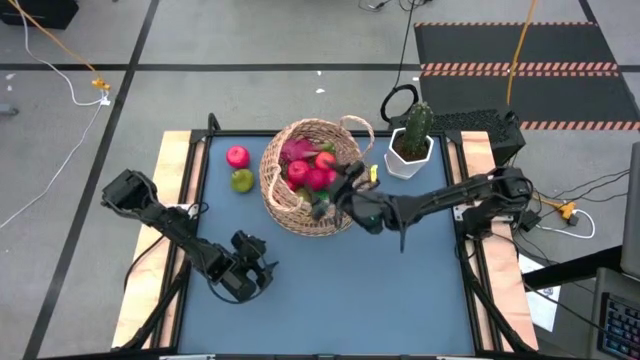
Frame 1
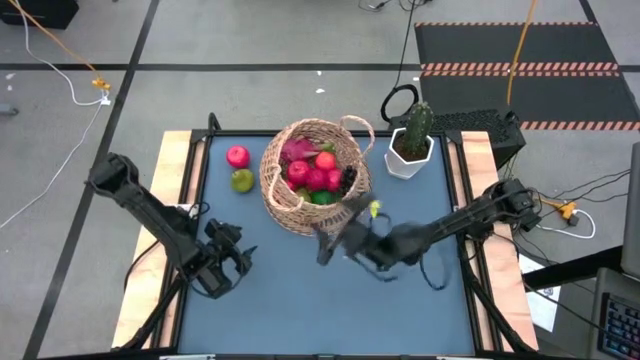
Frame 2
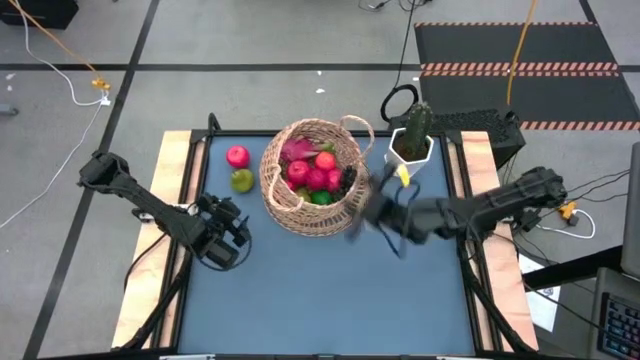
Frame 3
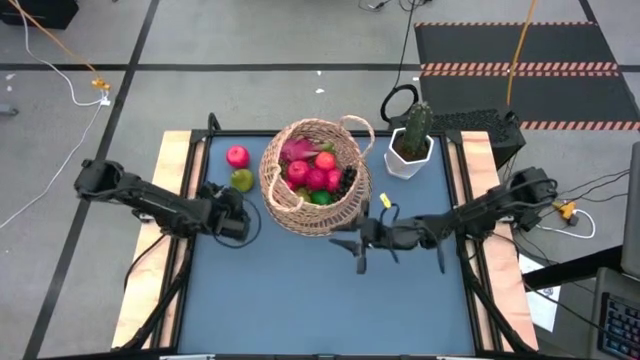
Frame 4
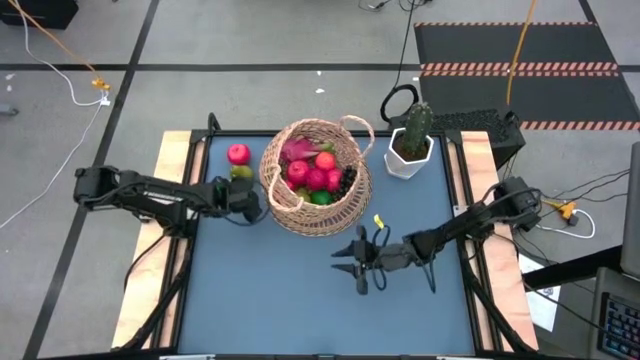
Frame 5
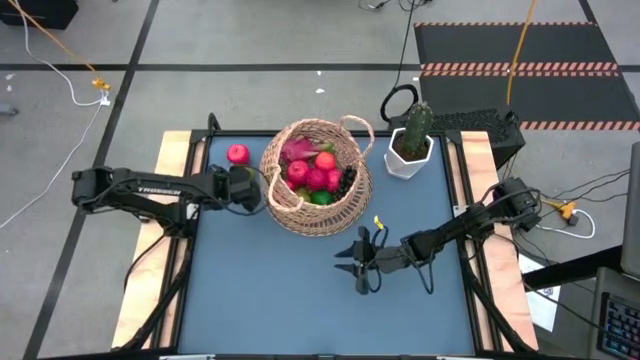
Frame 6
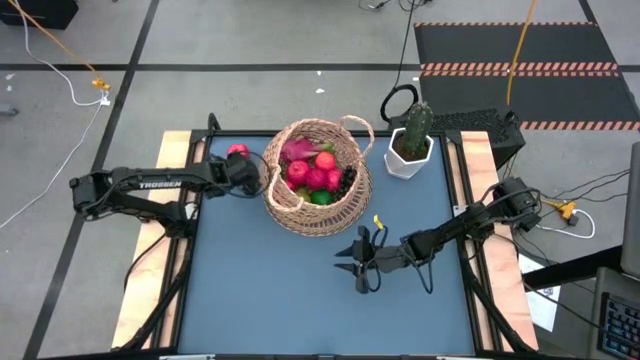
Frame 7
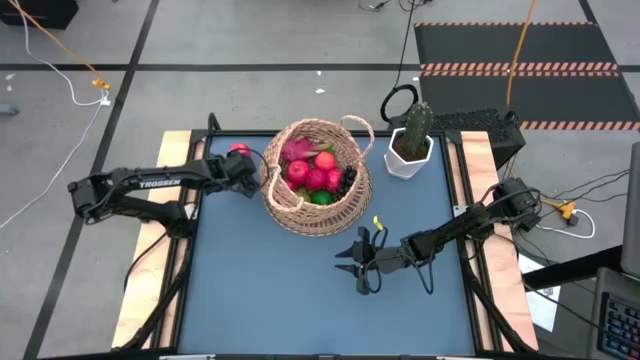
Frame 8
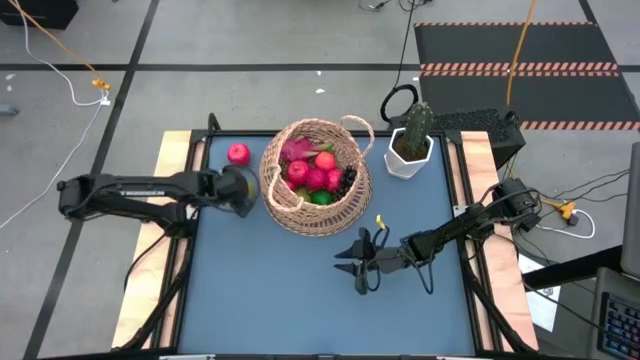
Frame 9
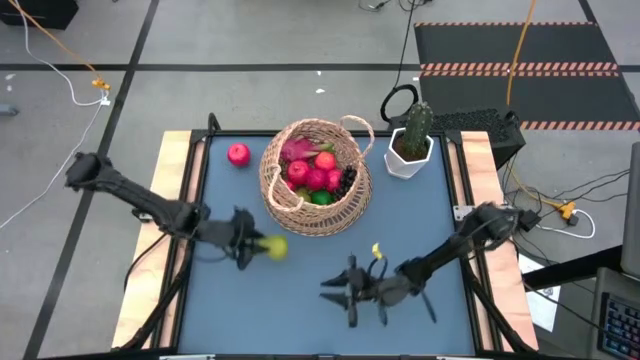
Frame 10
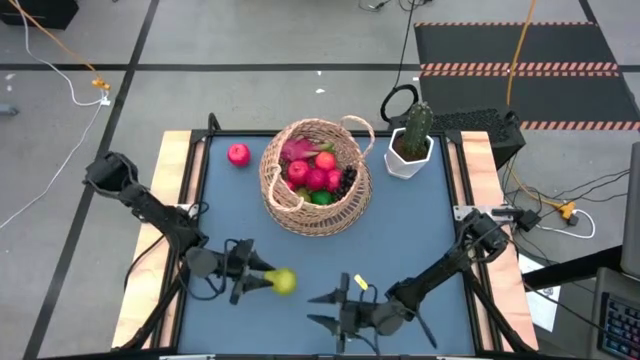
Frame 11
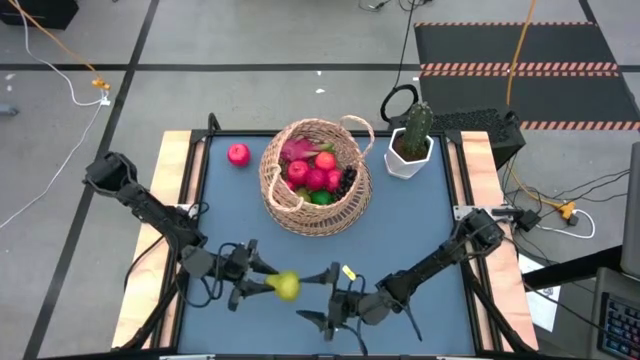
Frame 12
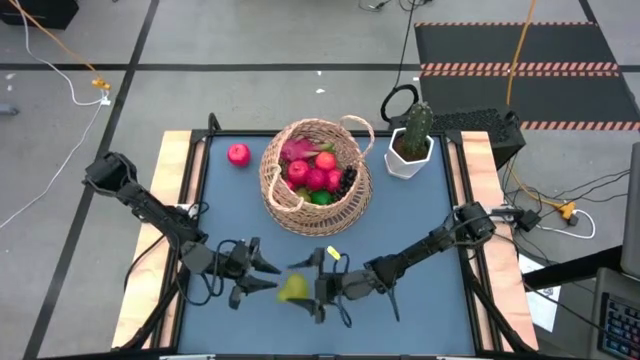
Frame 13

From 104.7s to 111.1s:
Task: Build produce basket
Put the pear into the brown basket

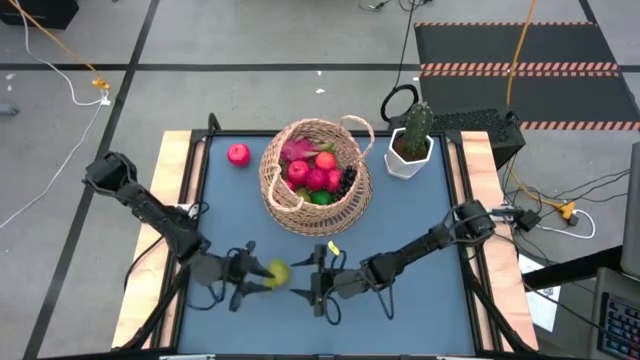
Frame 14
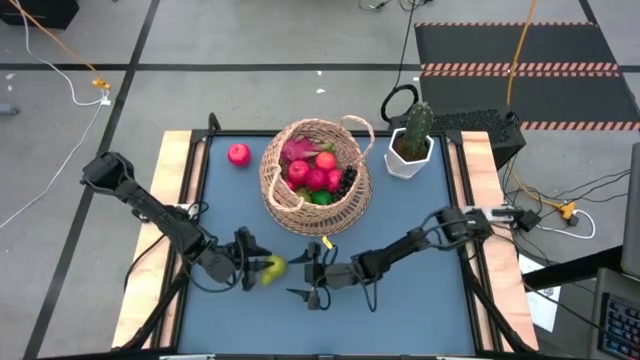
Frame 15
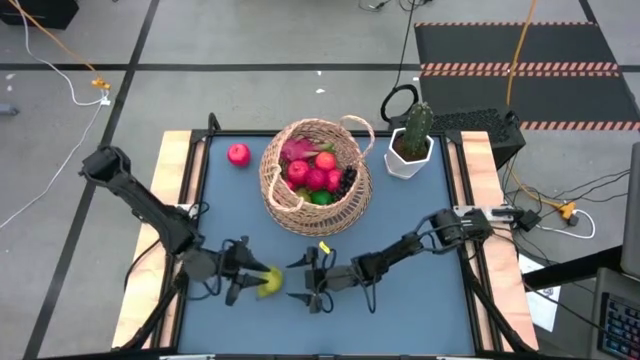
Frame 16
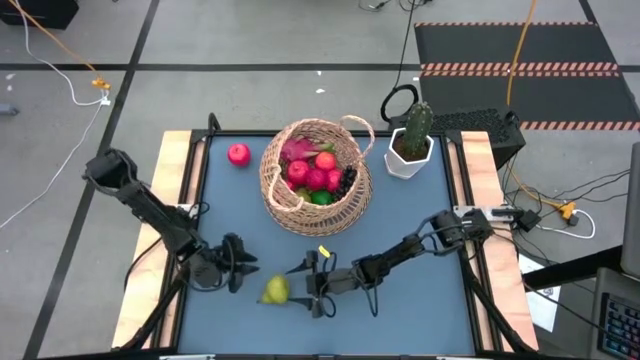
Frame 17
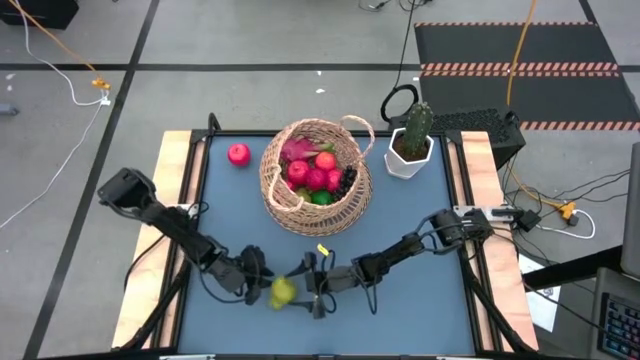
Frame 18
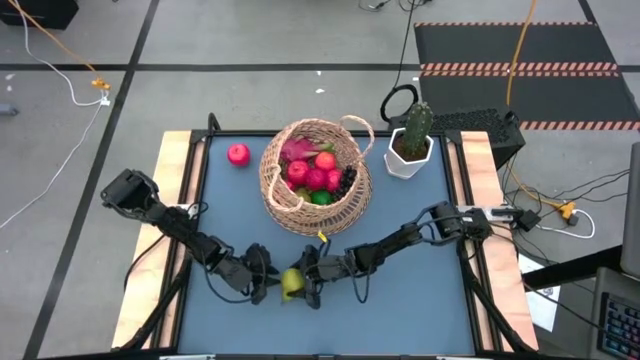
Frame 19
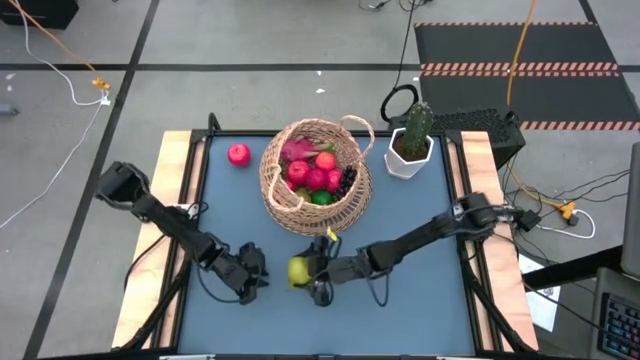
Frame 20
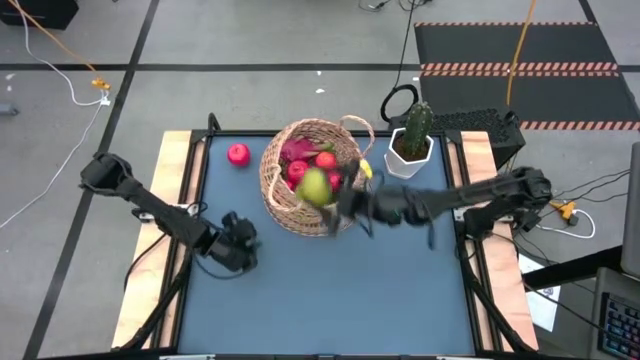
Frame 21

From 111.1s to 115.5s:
Put the pear into the brown basket

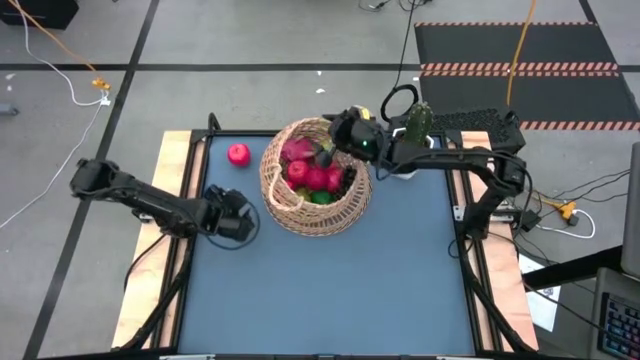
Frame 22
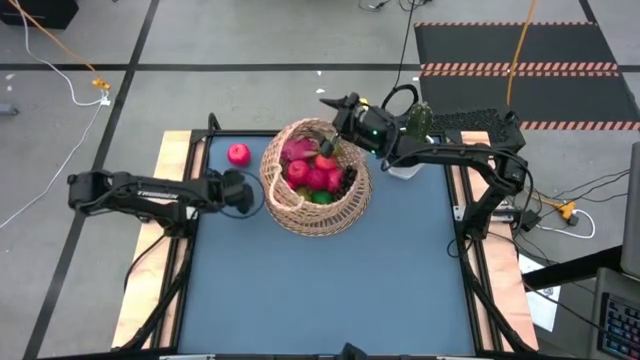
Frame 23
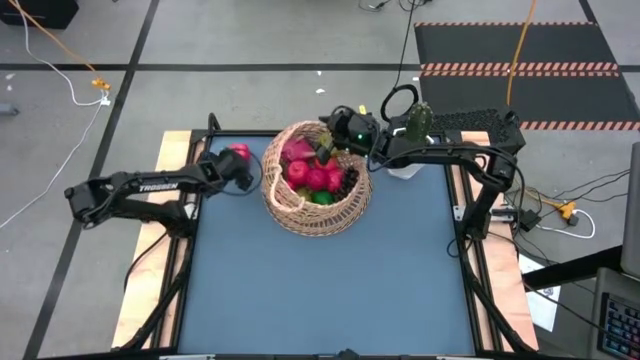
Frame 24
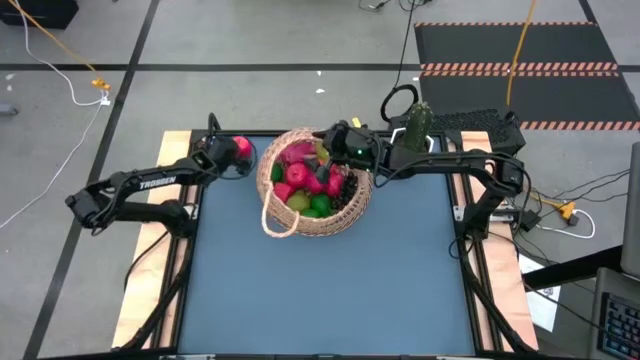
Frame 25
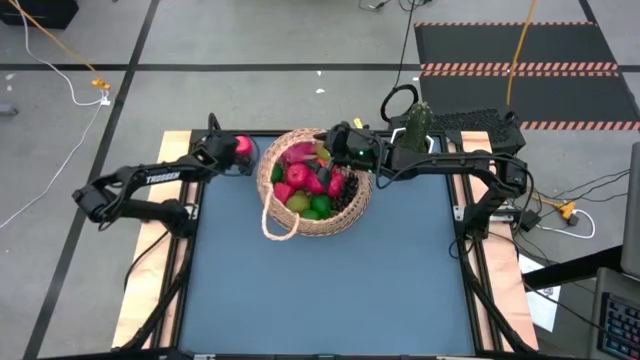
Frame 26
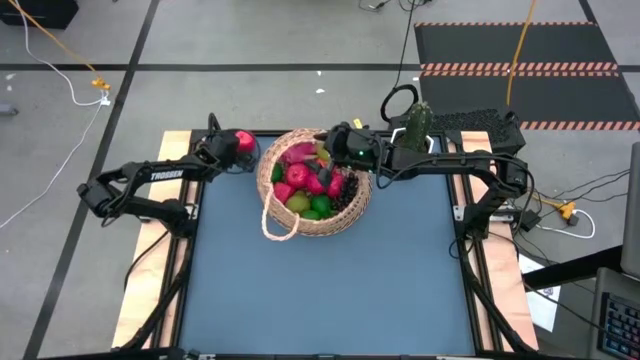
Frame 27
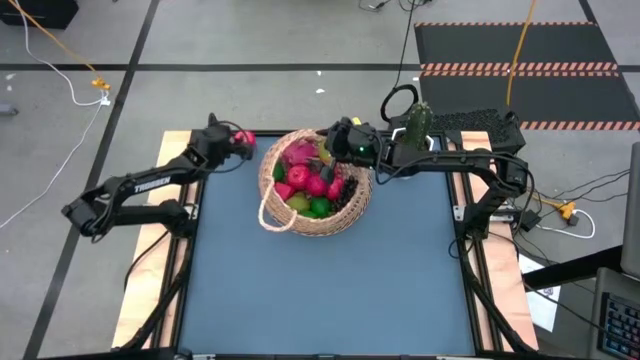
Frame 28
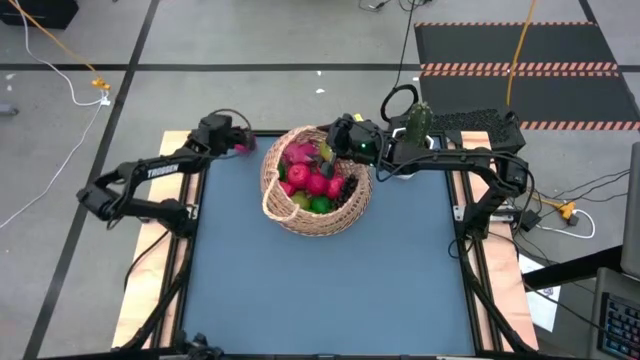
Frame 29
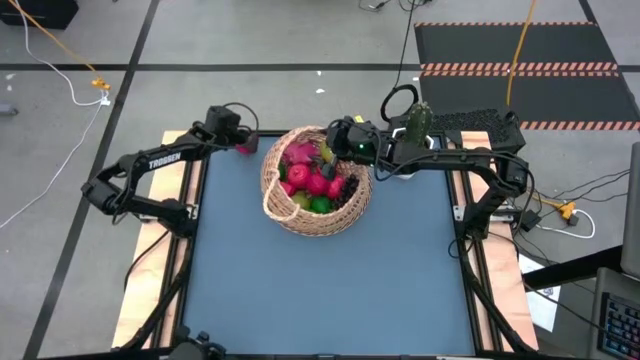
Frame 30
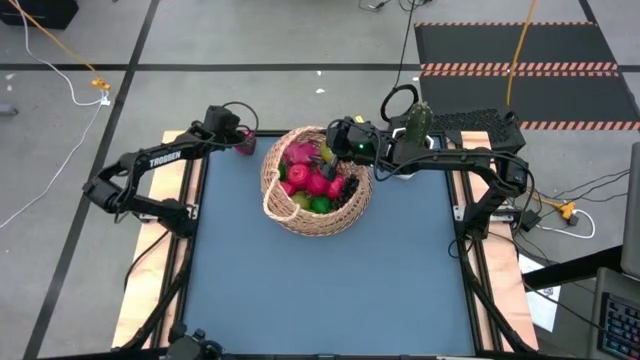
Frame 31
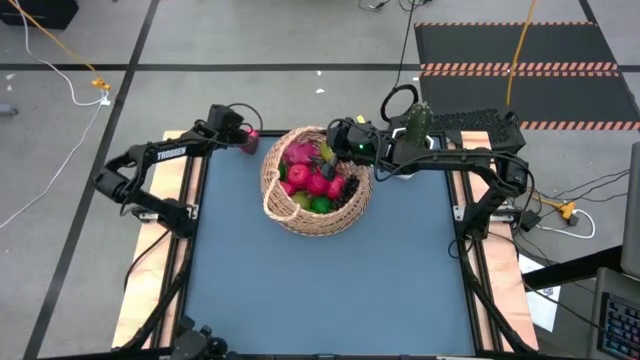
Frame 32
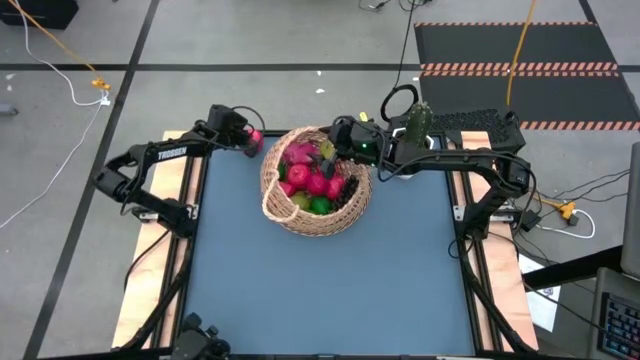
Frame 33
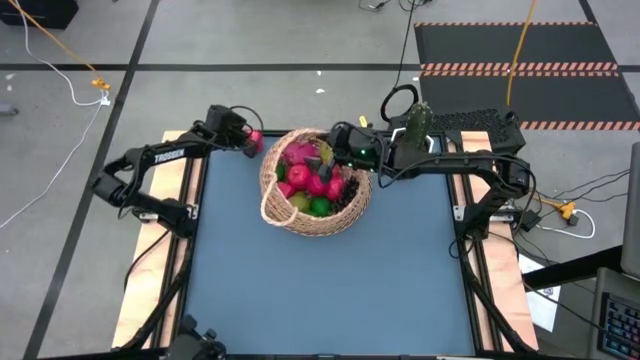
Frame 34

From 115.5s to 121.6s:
Put the apple into the brown basket

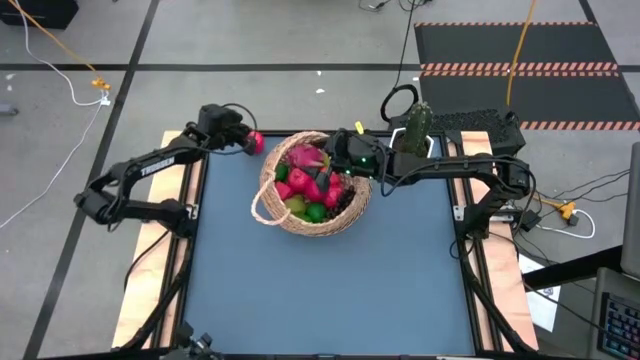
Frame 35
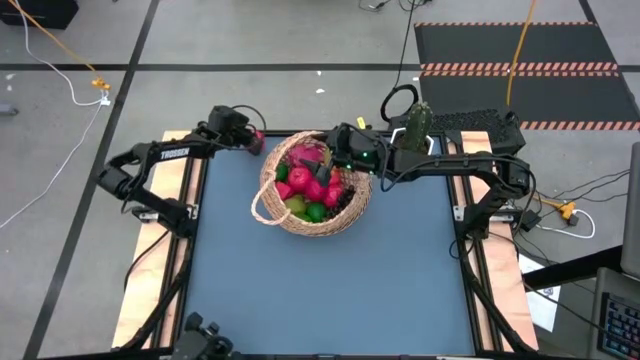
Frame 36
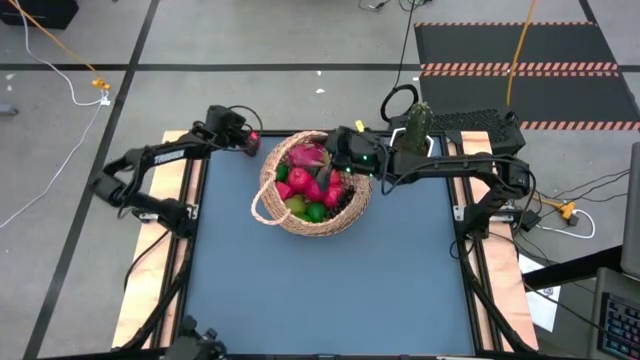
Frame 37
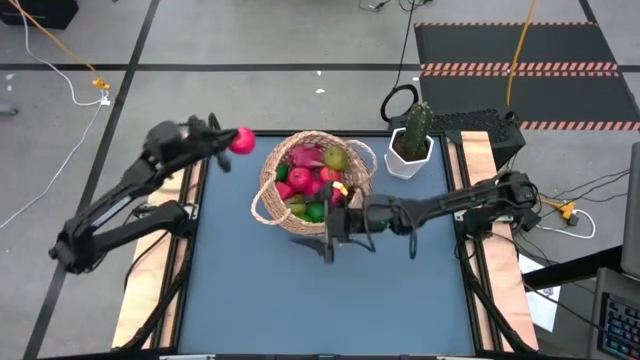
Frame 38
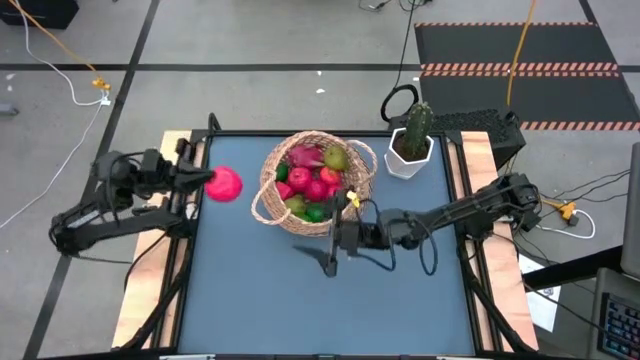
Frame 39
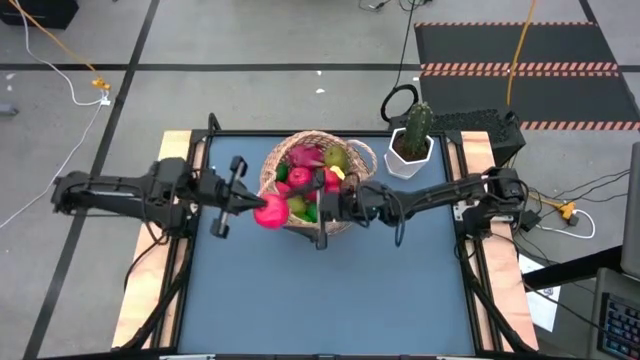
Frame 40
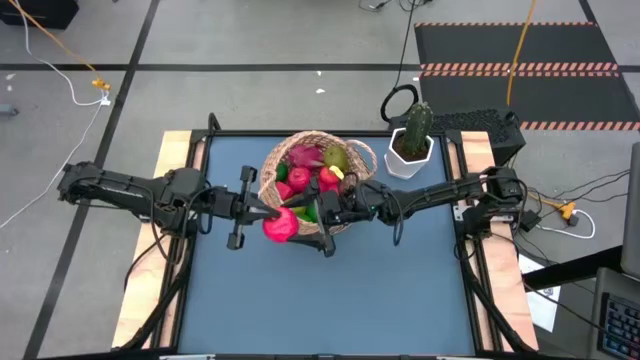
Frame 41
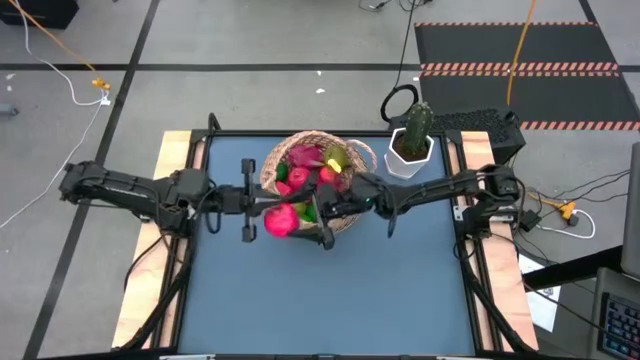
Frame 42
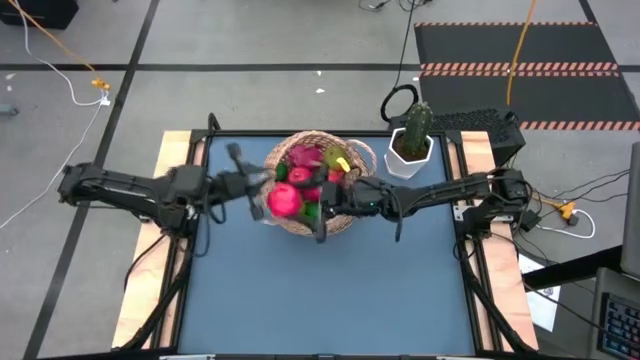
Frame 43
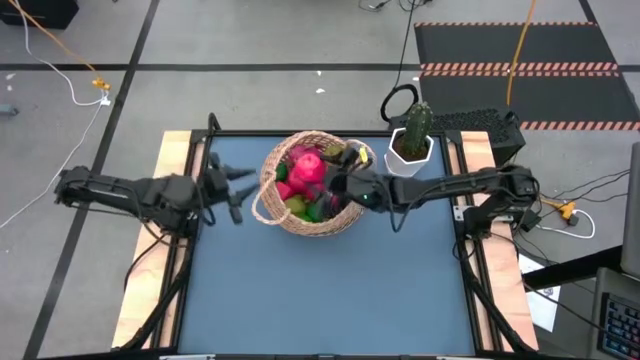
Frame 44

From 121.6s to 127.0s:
Put the apple into the brown basket
